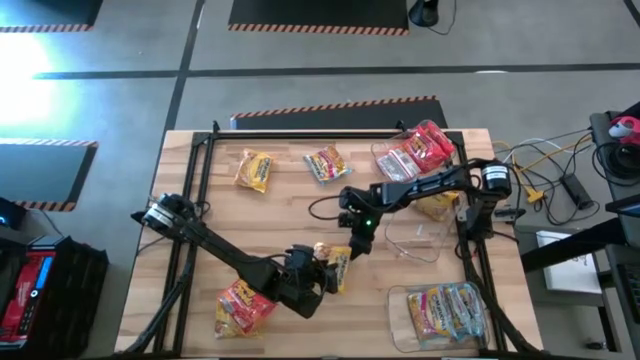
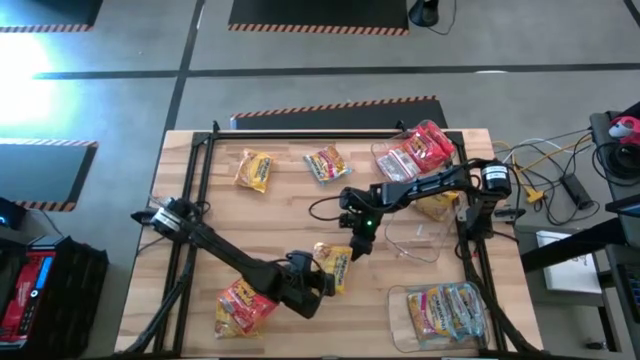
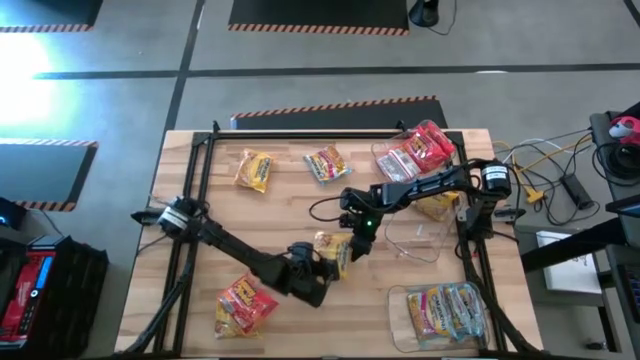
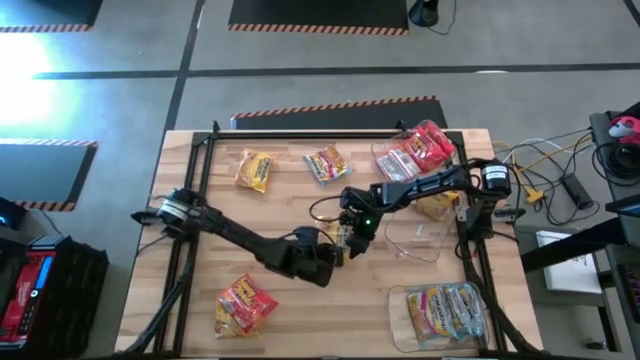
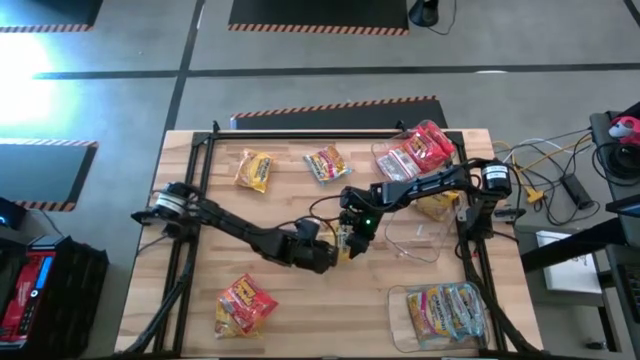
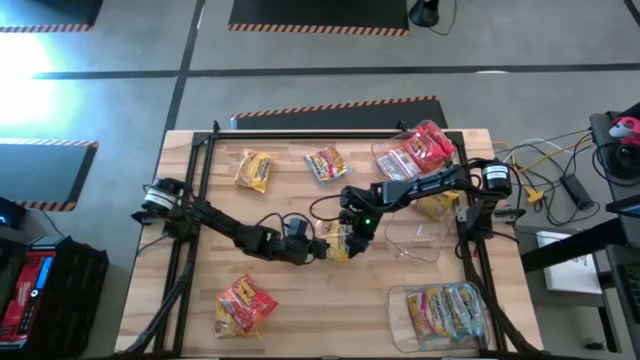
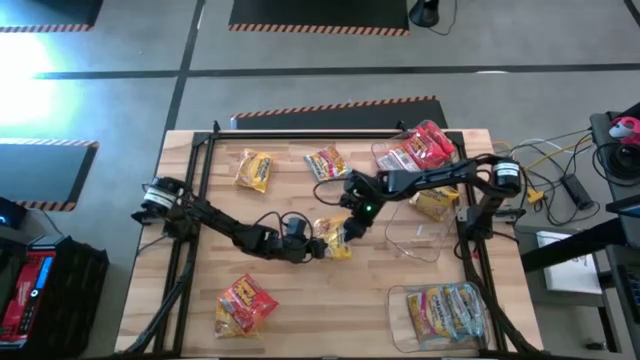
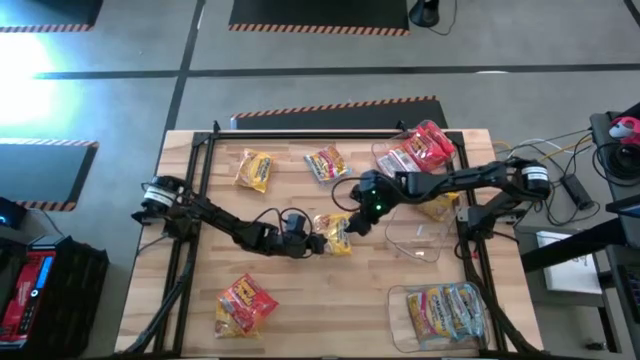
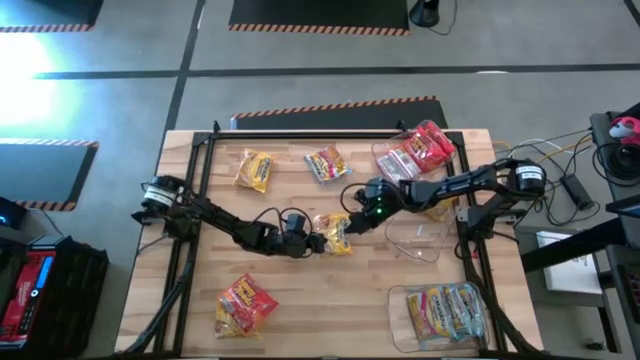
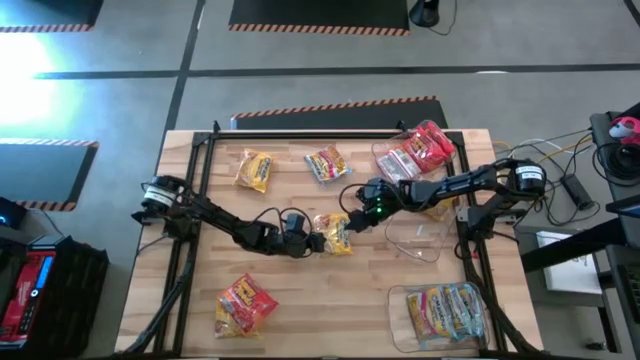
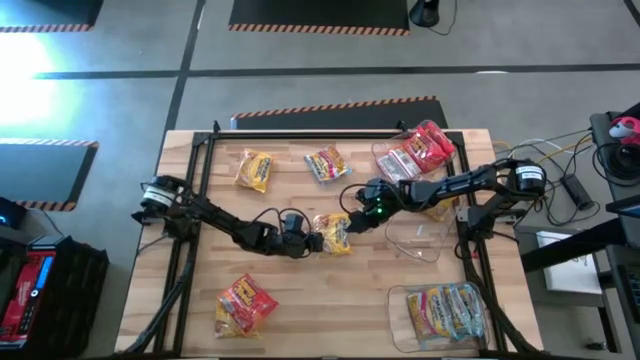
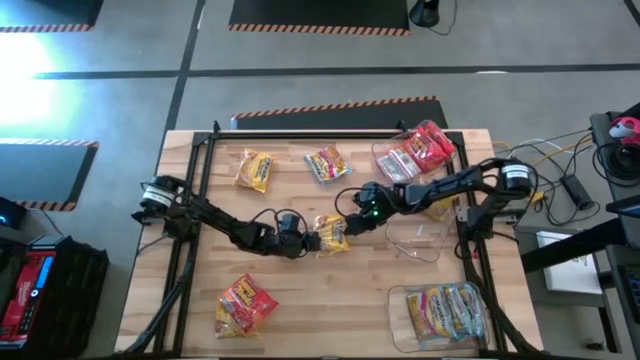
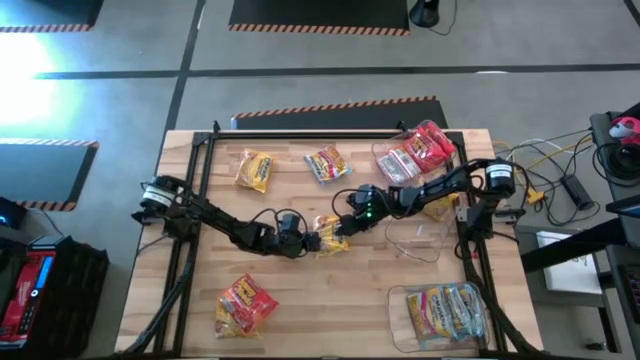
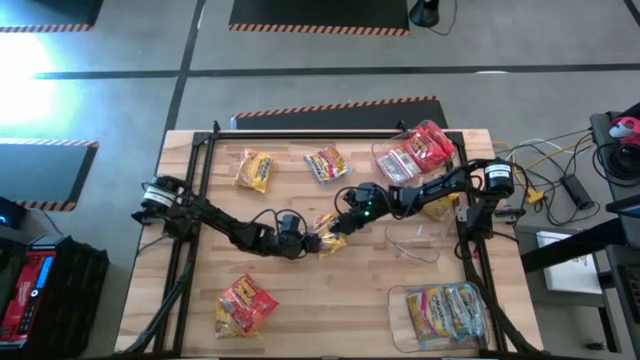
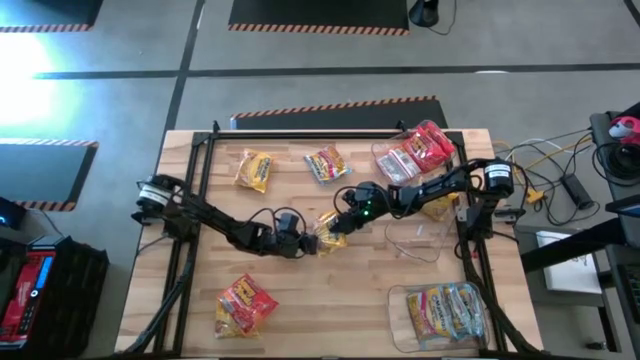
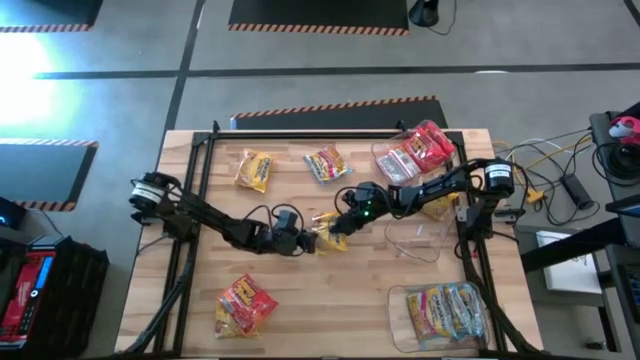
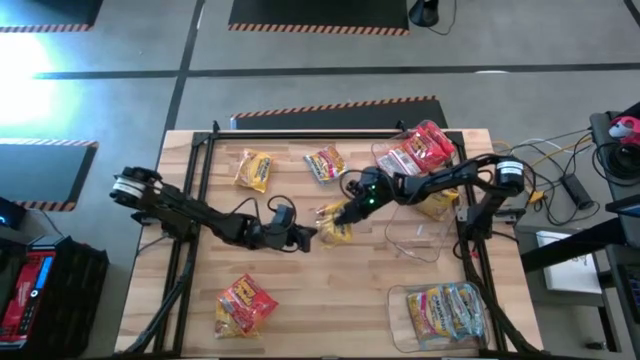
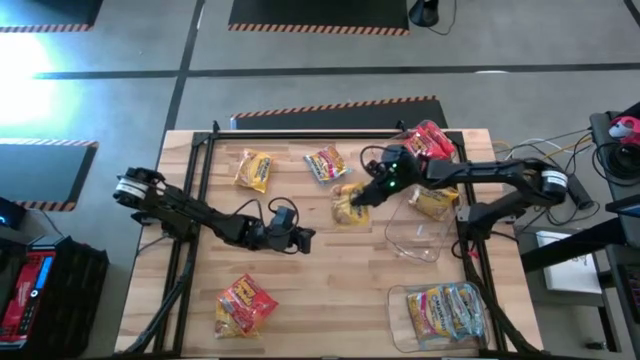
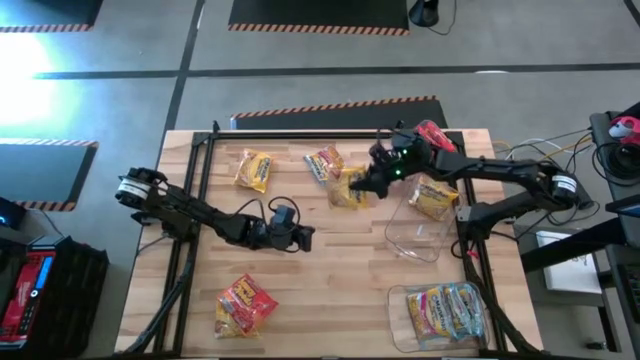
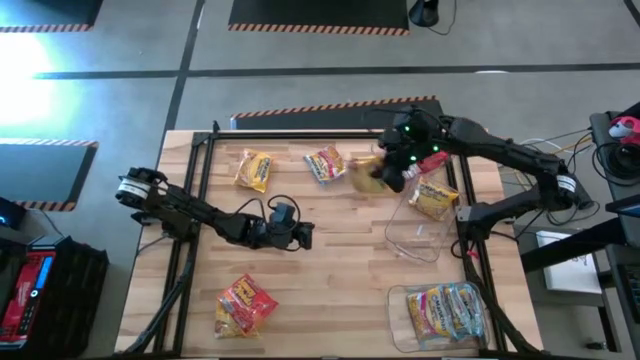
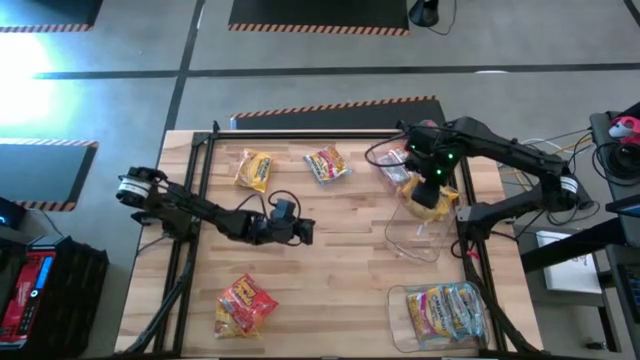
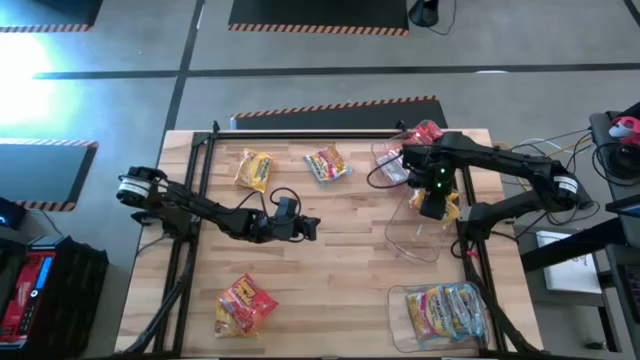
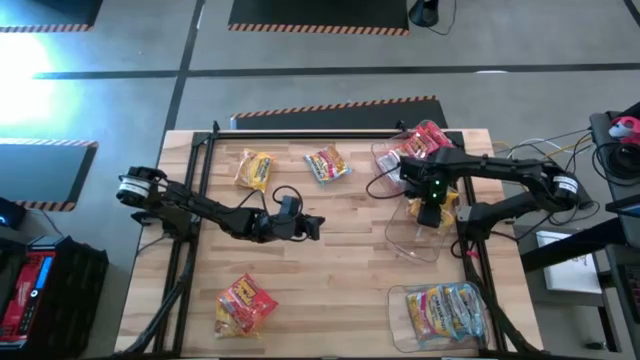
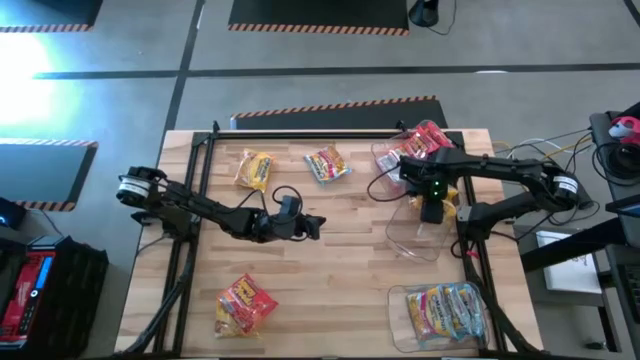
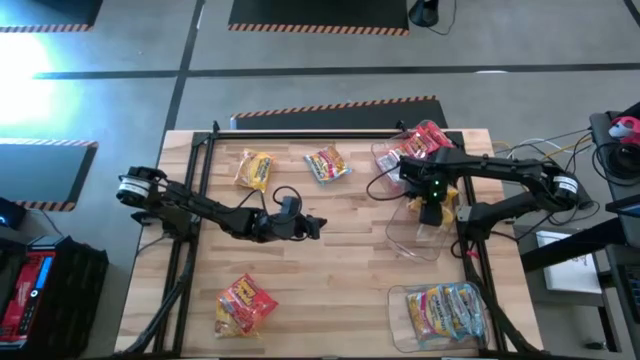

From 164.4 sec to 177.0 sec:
Task: Sort Maruchan noodles
Put the yellow noodle pack into the middle transparent bin

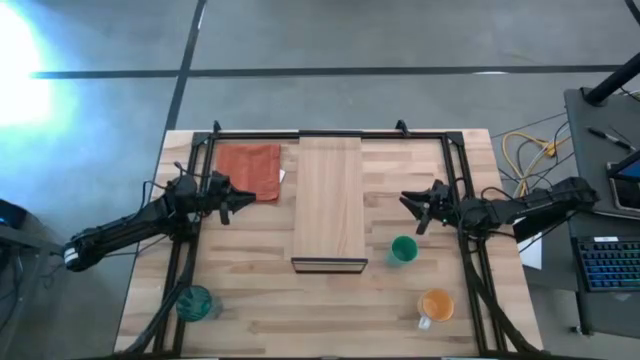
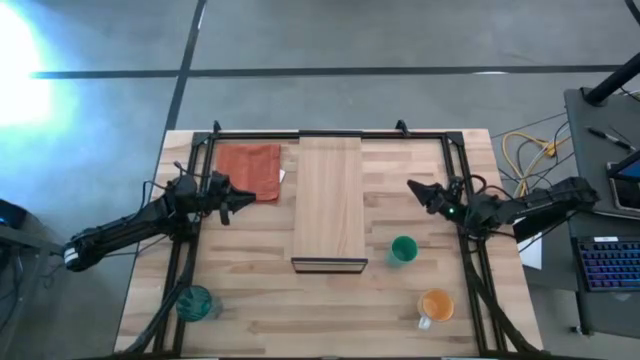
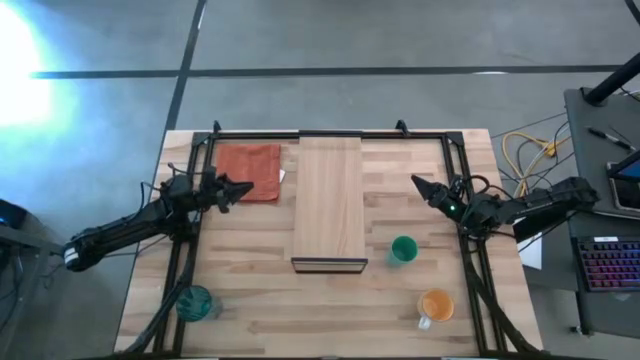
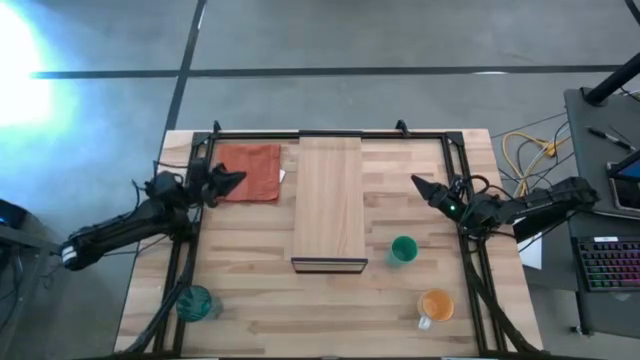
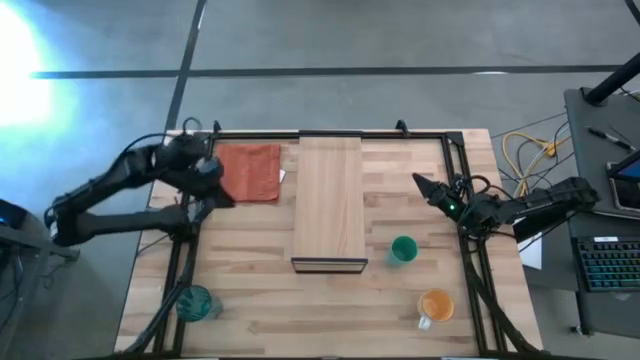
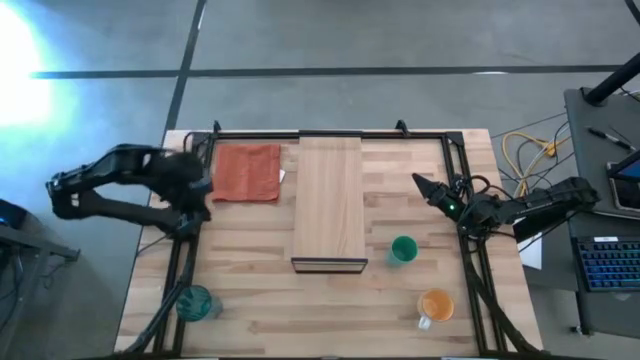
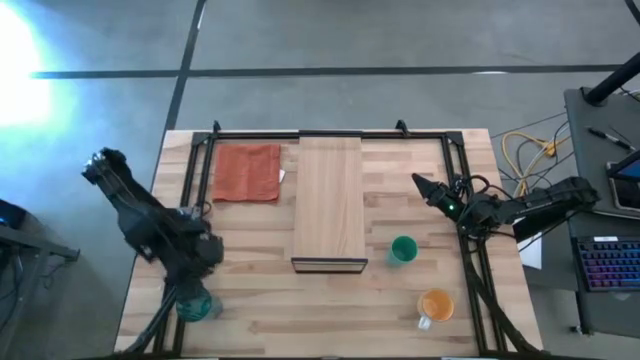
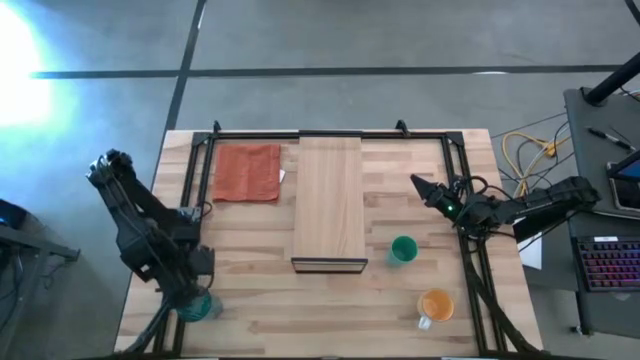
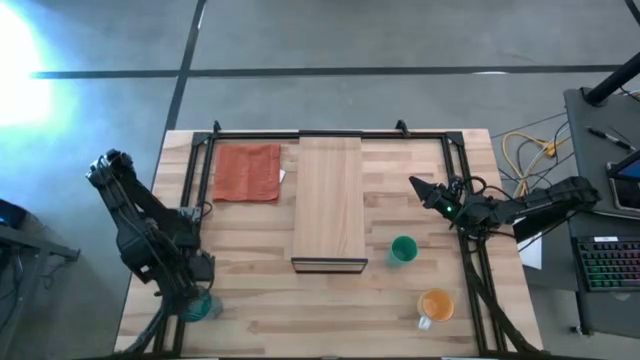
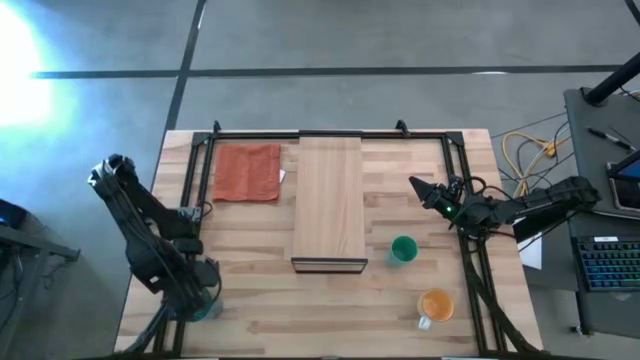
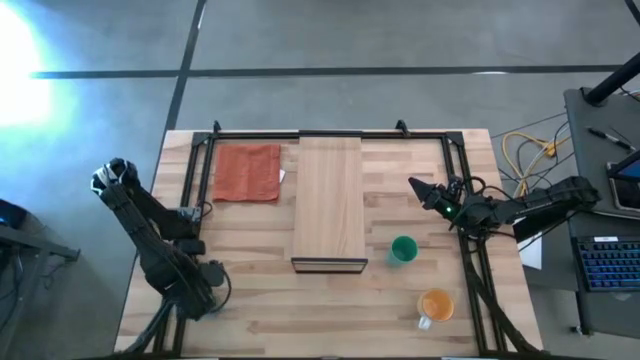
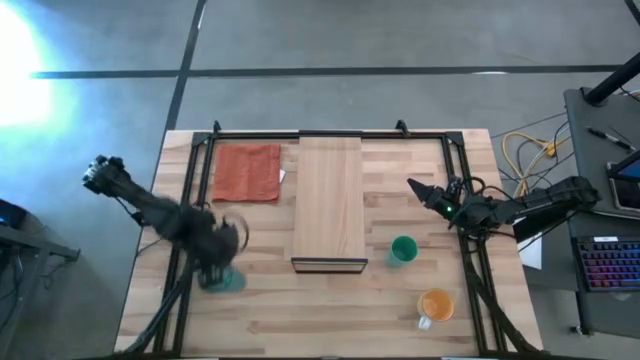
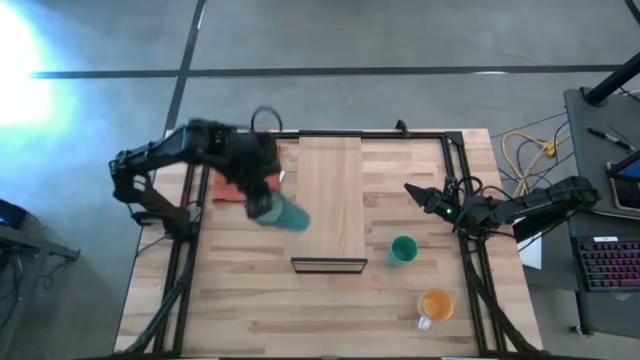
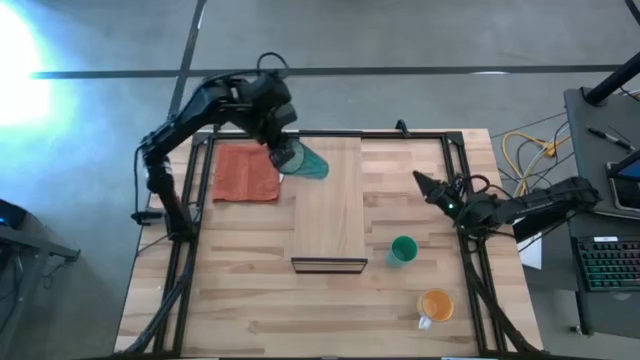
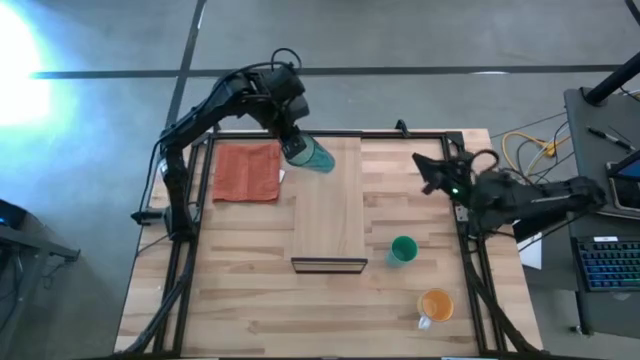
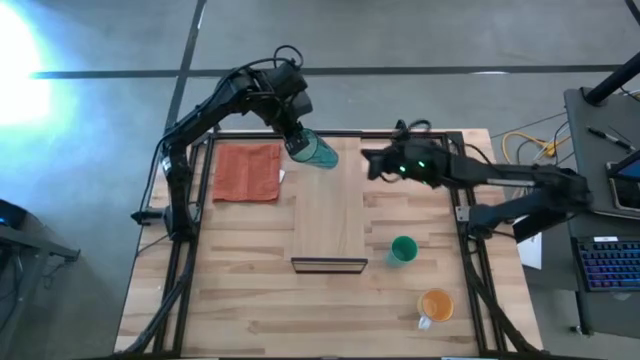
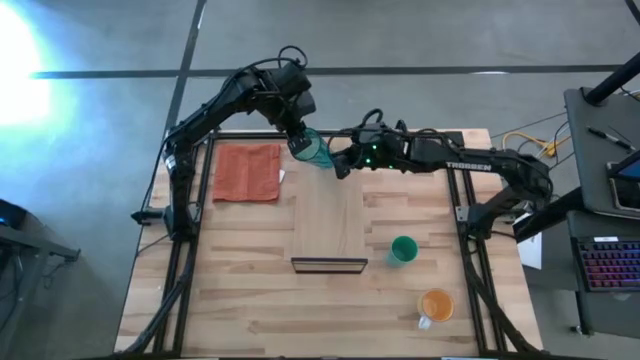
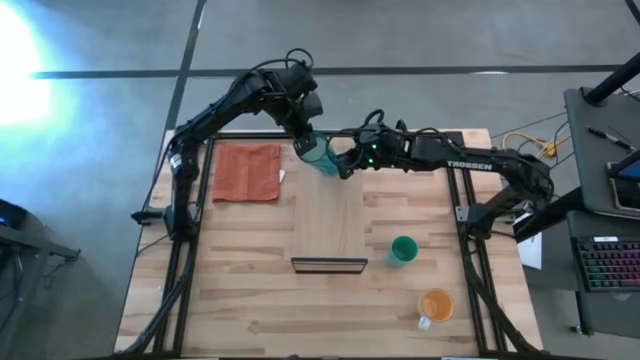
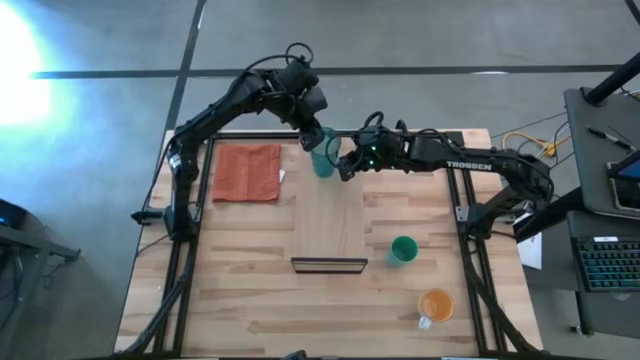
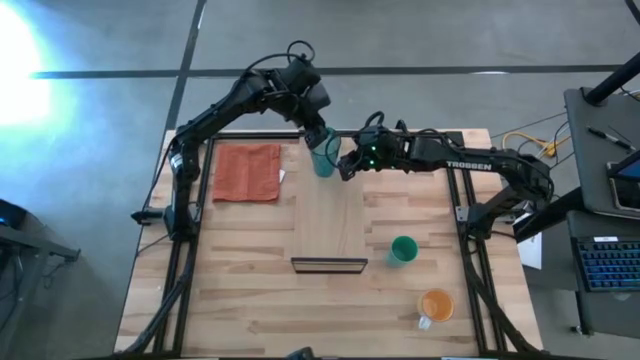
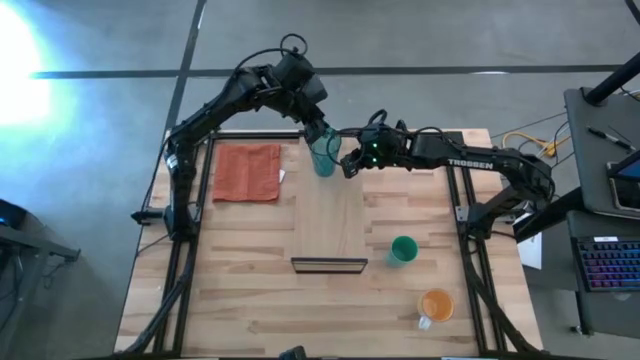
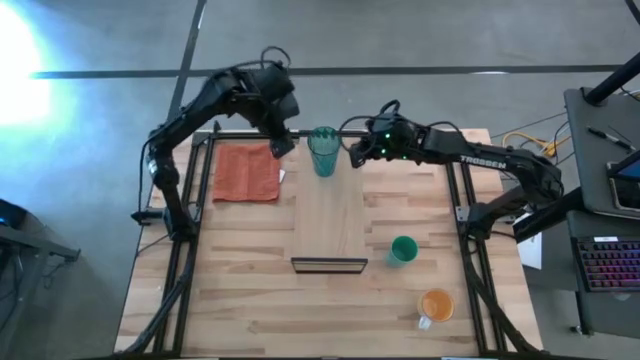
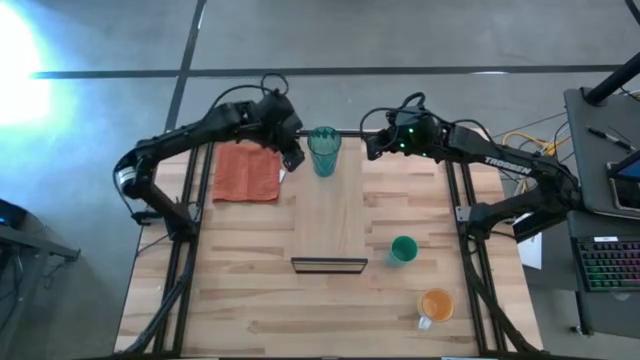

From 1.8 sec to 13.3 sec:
Task: Stack small to large cups/mugs on shelf
Put the blue cup on the shelf
